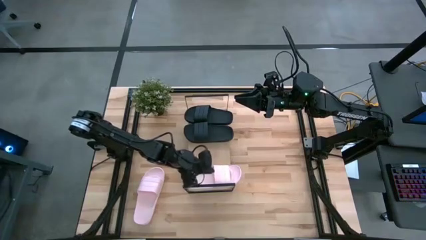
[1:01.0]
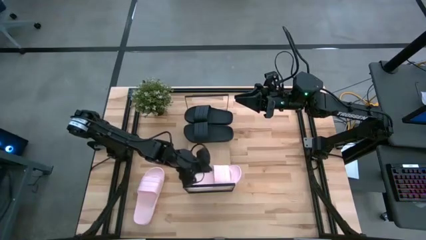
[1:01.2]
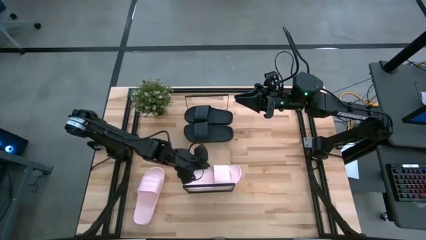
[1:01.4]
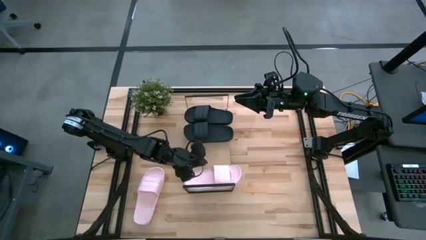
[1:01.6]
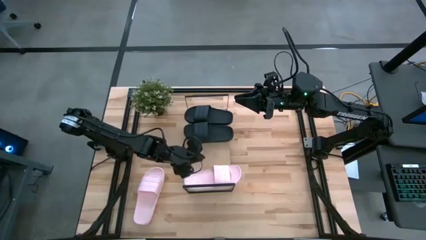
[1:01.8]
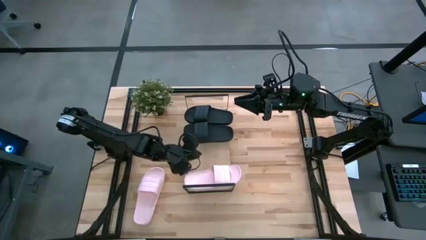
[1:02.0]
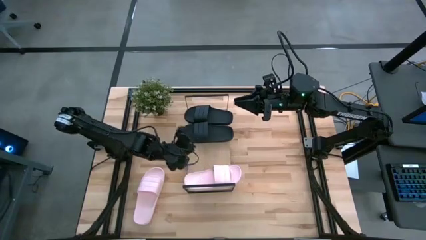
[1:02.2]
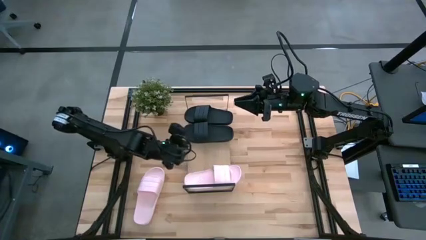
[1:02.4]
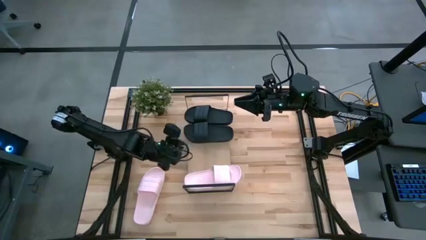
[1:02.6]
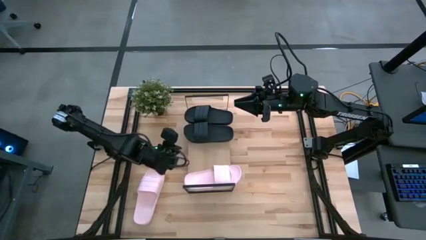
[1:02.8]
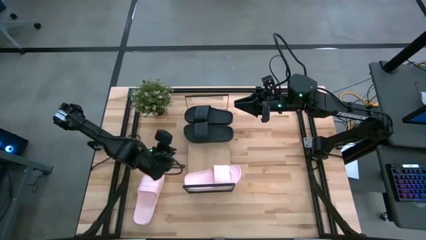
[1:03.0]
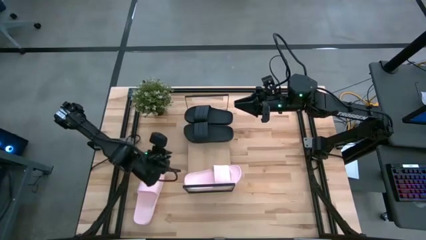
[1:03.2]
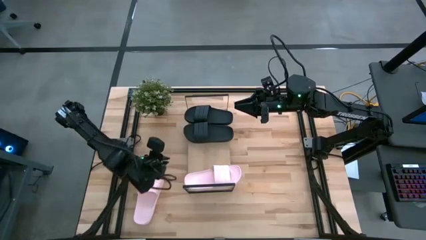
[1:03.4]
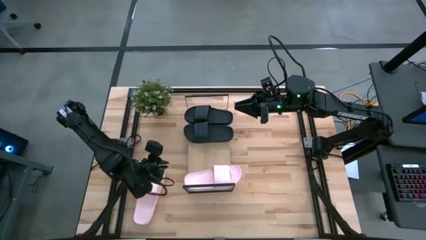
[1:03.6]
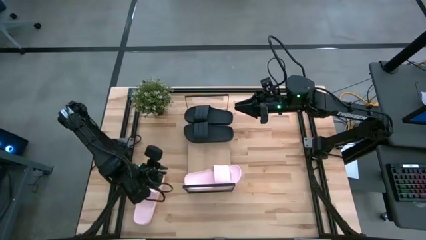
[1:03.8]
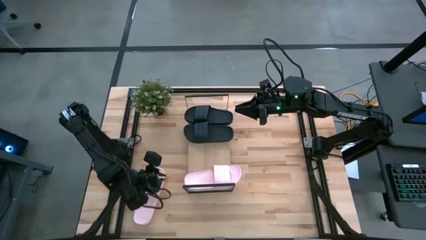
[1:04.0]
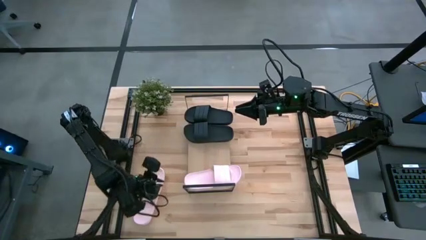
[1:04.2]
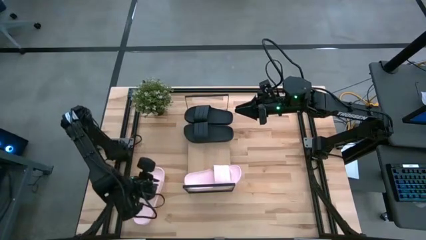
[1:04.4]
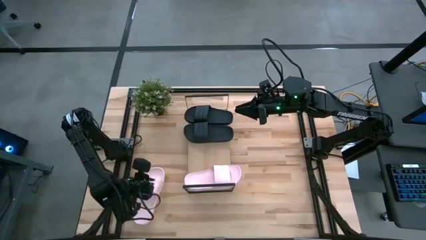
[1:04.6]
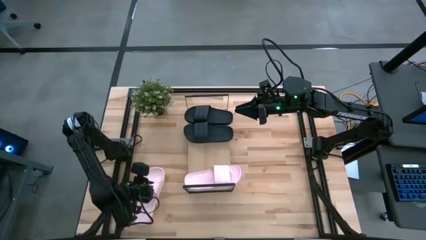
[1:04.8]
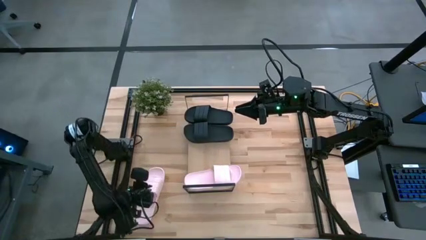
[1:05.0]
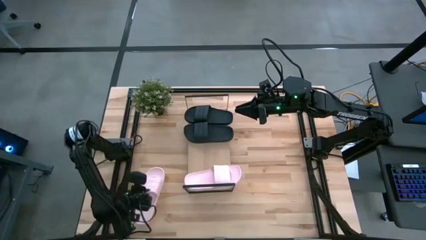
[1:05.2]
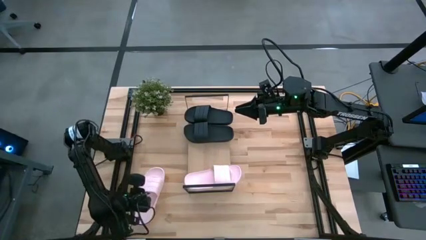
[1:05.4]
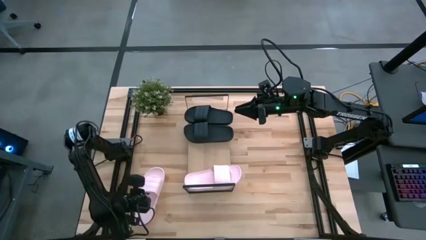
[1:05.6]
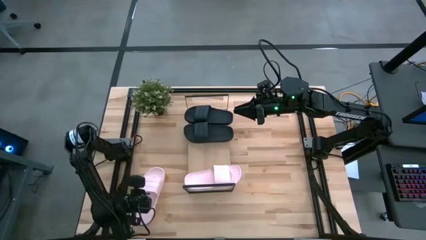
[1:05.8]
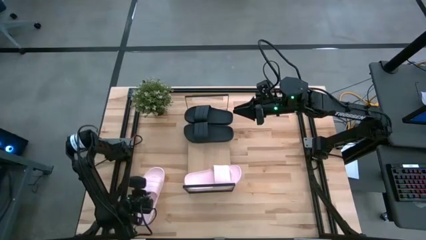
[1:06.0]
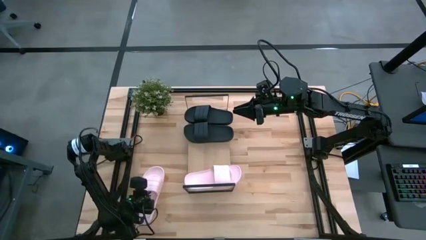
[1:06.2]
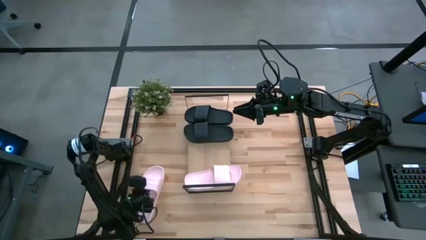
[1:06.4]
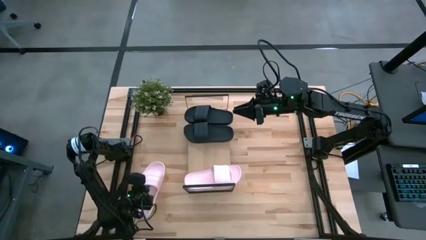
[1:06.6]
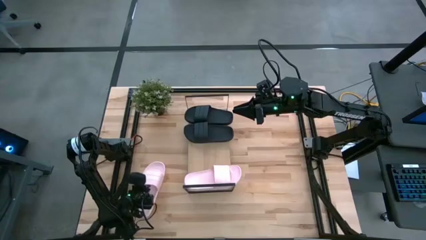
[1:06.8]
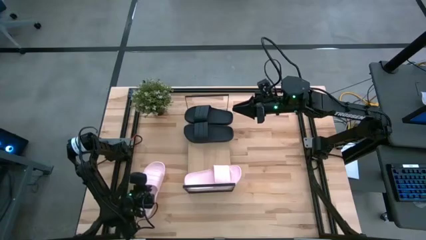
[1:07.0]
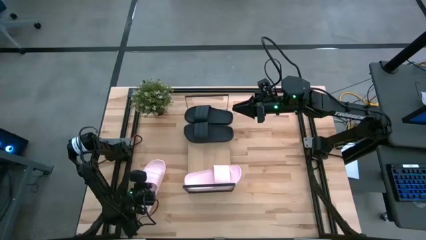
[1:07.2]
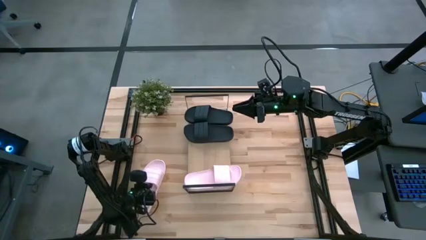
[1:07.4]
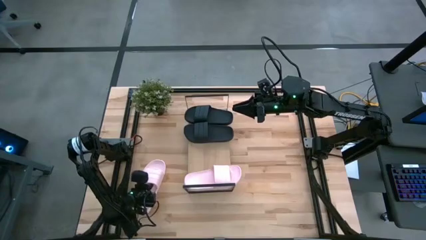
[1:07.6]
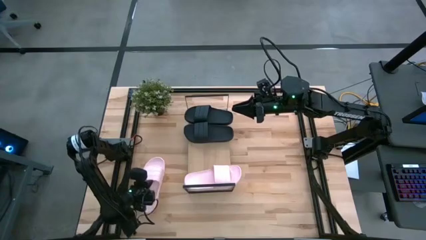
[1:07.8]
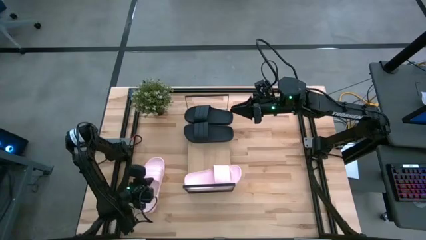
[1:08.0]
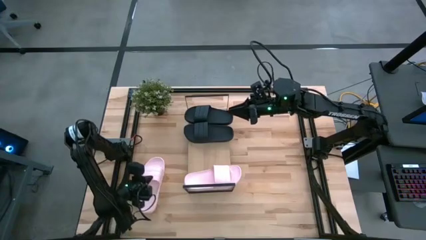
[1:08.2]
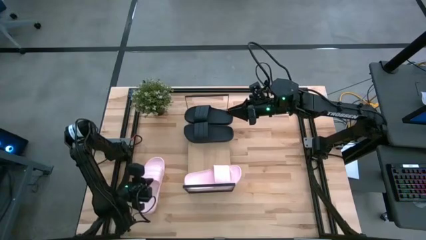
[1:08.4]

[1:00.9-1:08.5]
Task: Pick and place slides into the shelf
Put the pink slide on the shelf

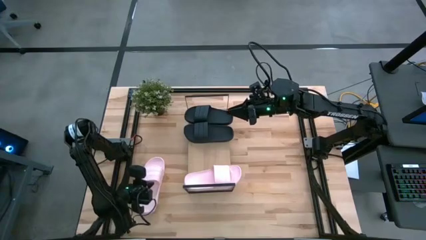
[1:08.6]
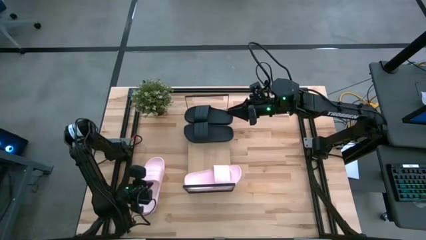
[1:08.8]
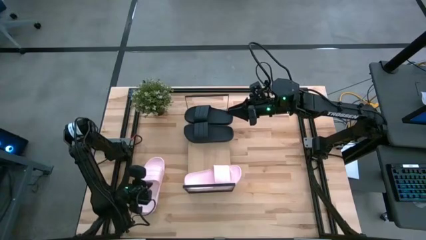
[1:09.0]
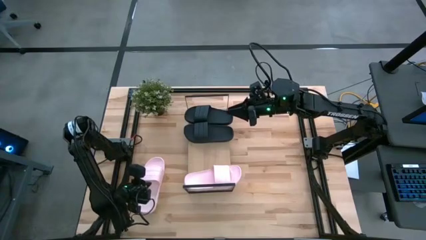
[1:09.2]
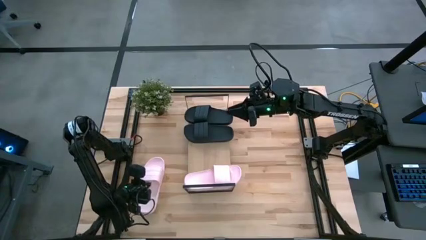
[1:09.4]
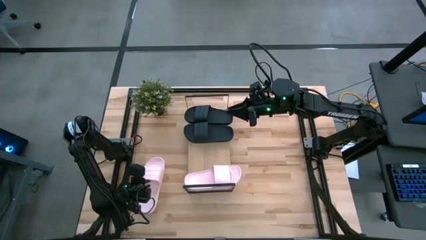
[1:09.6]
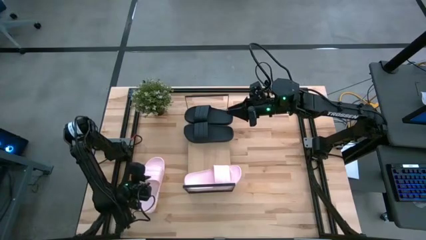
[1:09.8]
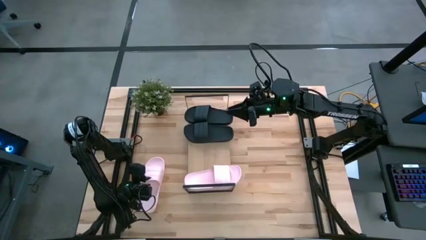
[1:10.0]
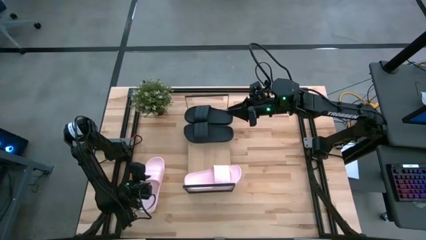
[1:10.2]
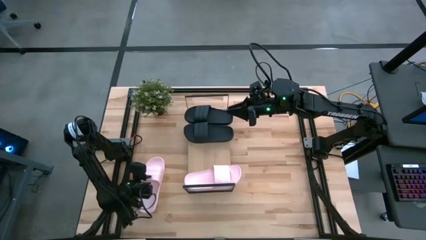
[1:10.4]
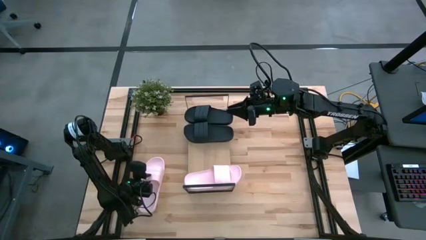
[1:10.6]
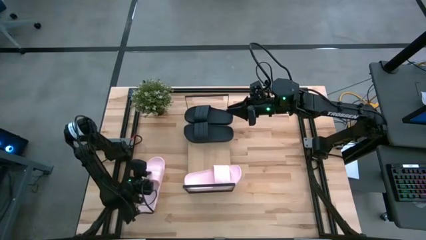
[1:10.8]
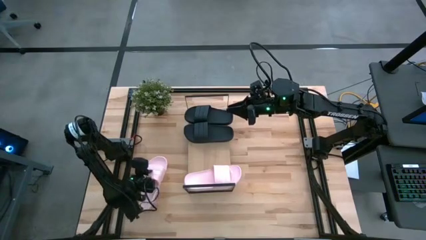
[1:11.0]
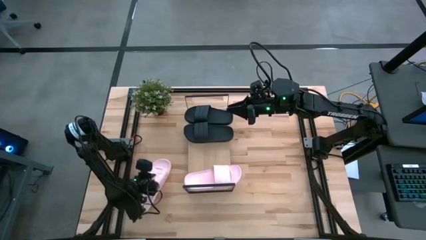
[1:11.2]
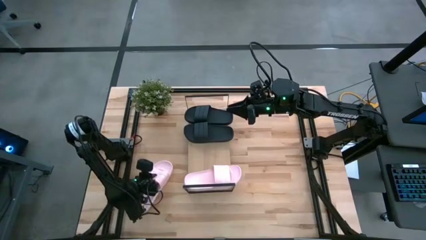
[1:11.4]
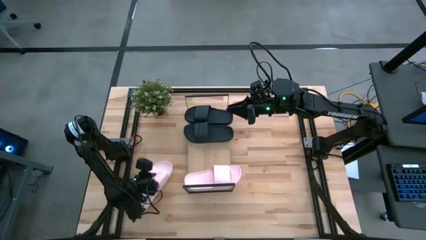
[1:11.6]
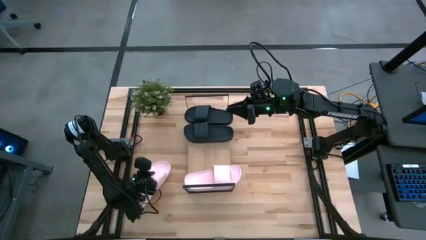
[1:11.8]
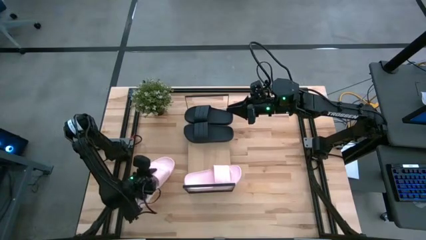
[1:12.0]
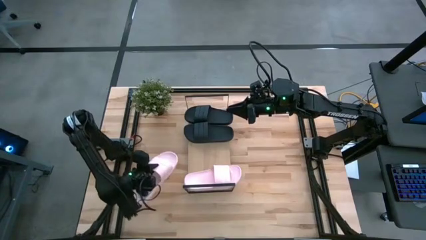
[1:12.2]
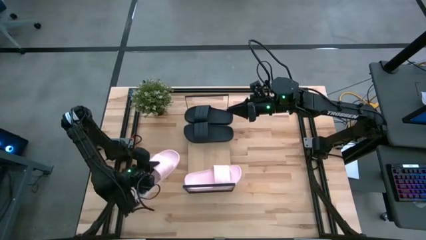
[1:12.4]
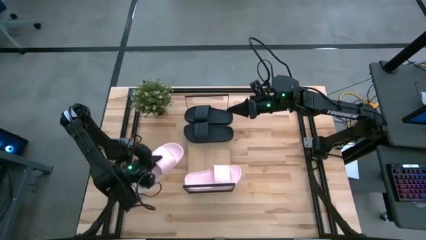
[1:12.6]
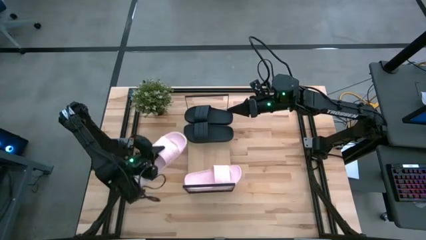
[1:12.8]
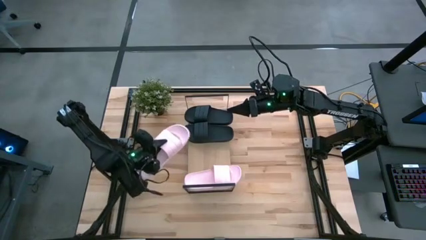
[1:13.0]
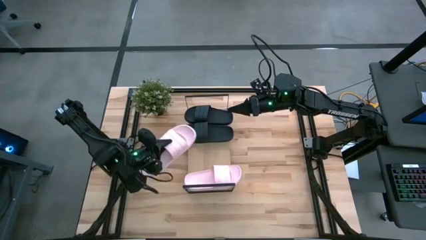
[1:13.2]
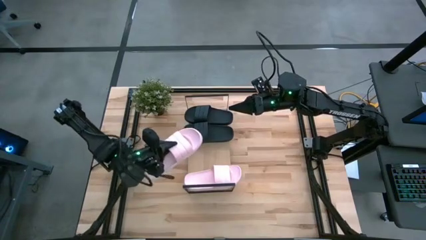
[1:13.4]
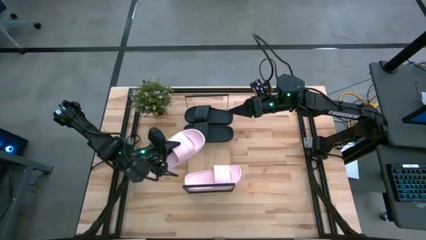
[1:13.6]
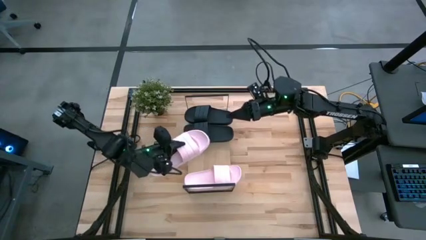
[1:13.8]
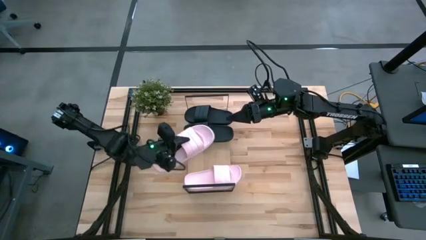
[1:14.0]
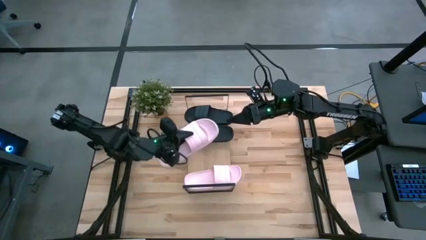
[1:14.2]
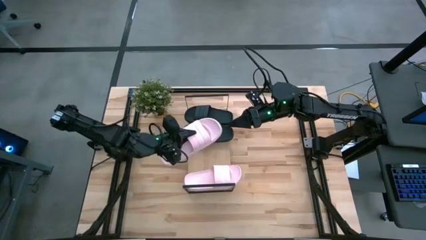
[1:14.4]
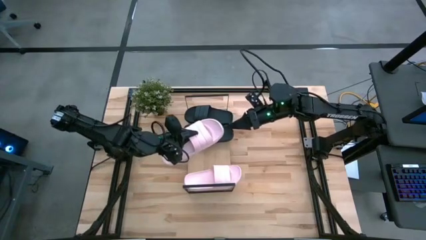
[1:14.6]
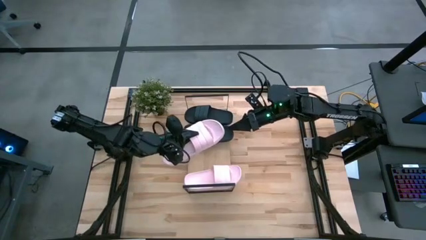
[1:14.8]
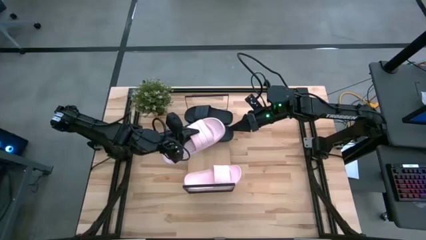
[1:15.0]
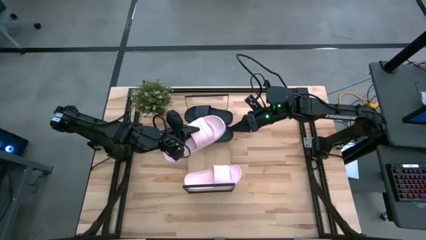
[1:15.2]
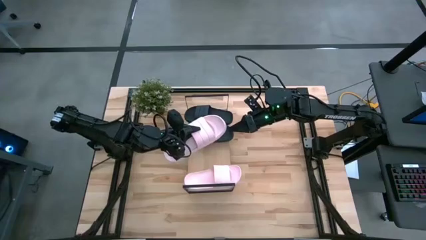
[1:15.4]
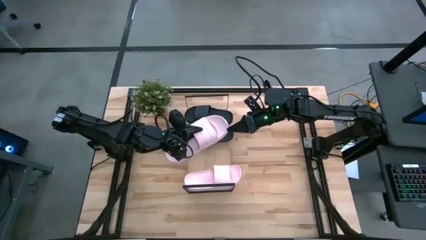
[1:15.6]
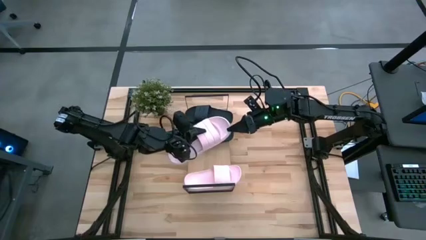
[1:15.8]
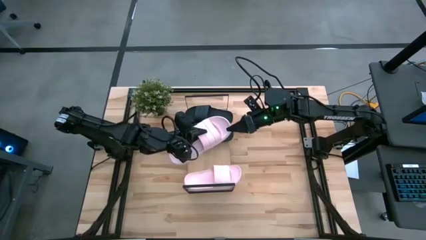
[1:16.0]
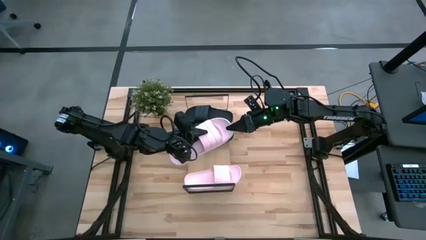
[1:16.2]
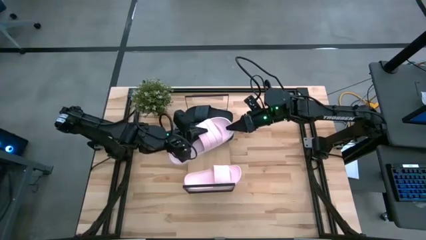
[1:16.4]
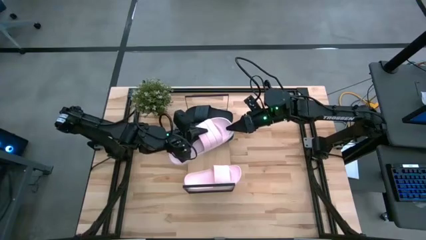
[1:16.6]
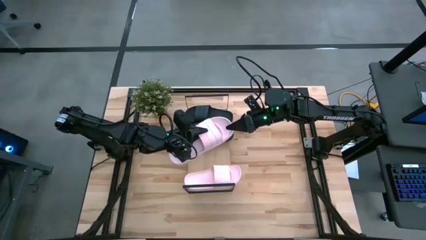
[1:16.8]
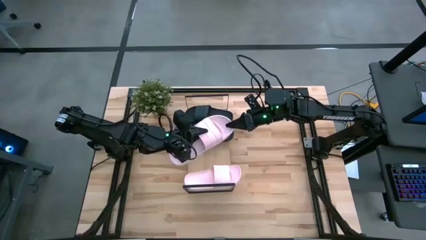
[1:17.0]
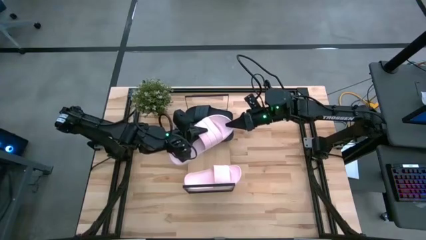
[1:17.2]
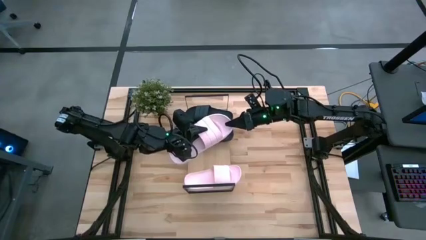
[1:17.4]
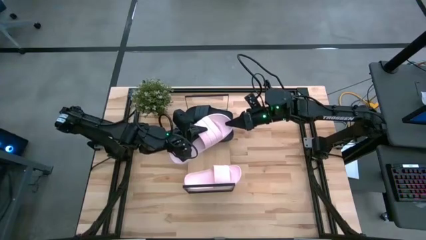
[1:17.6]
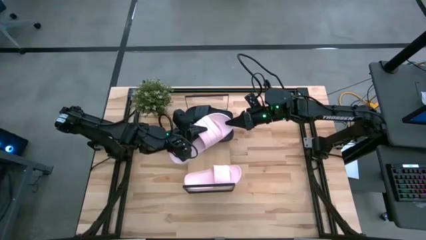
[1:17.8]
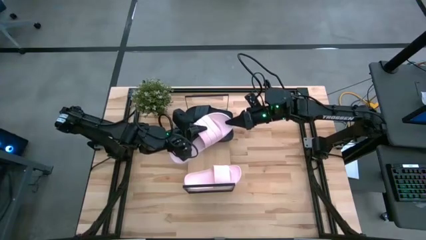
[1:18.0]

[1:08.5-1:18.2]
Put the pink slide on the shelf
